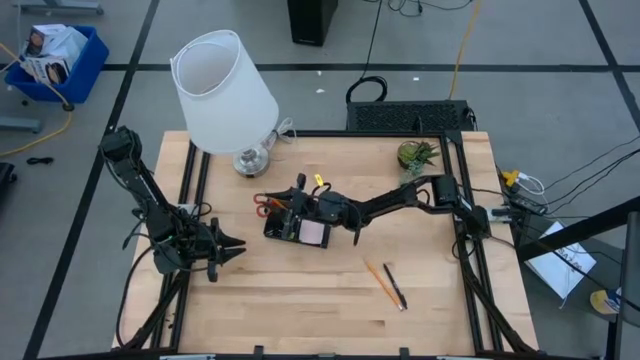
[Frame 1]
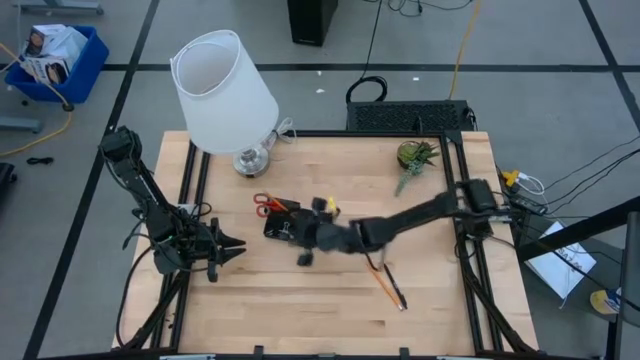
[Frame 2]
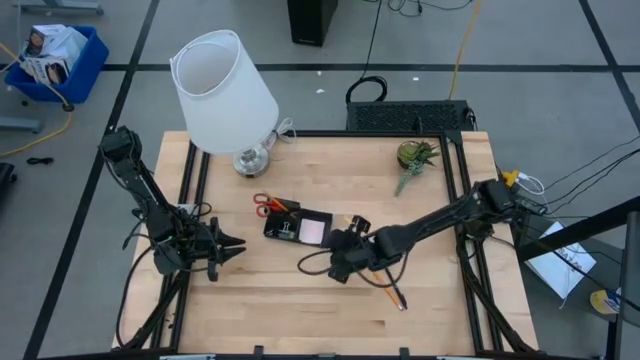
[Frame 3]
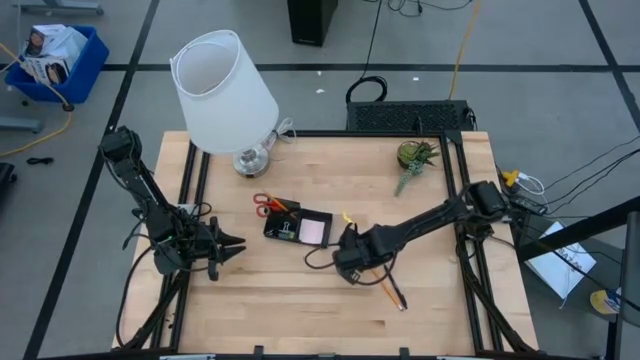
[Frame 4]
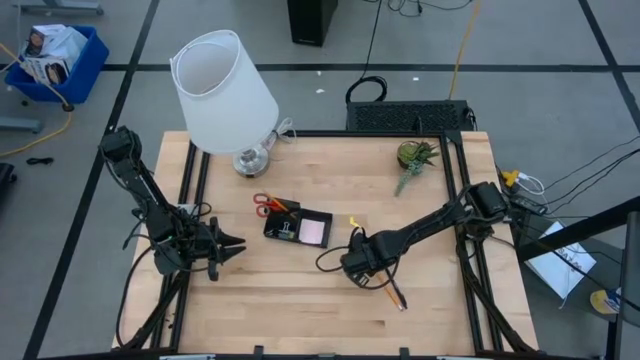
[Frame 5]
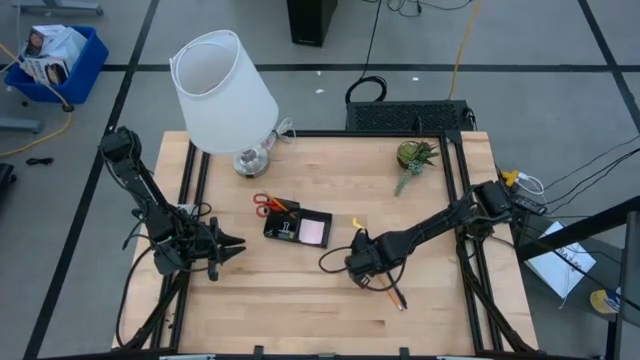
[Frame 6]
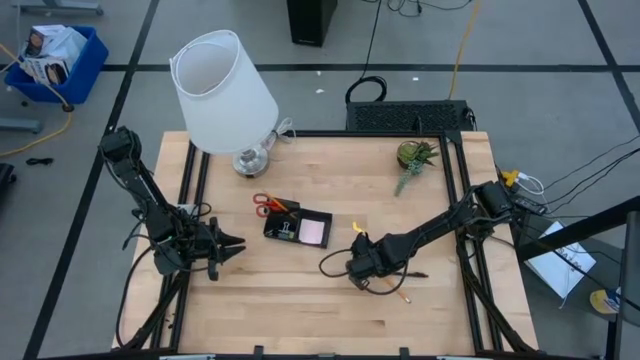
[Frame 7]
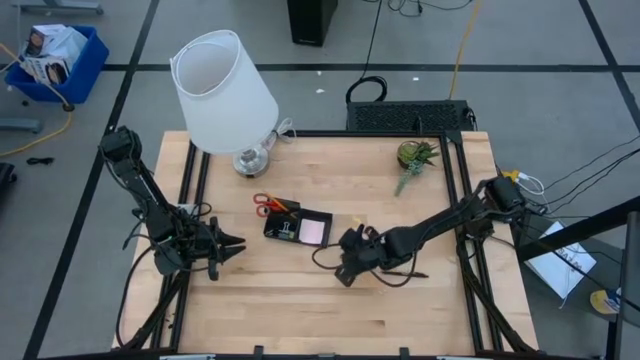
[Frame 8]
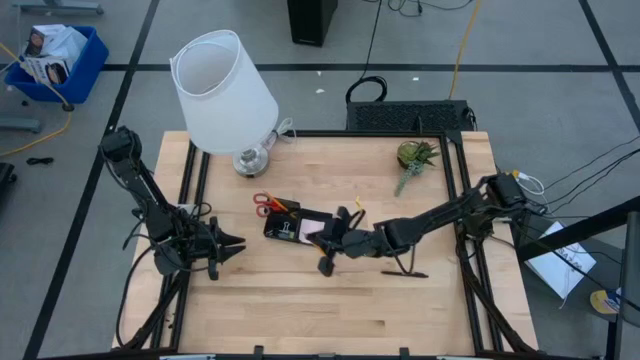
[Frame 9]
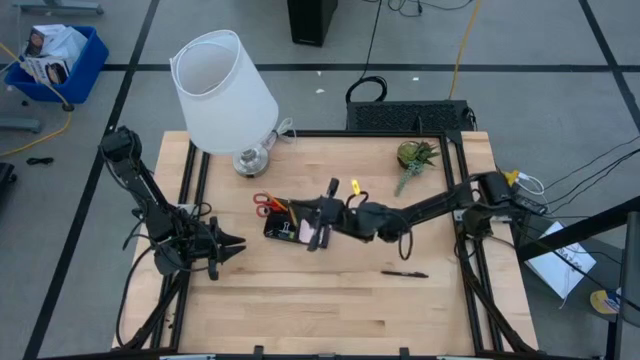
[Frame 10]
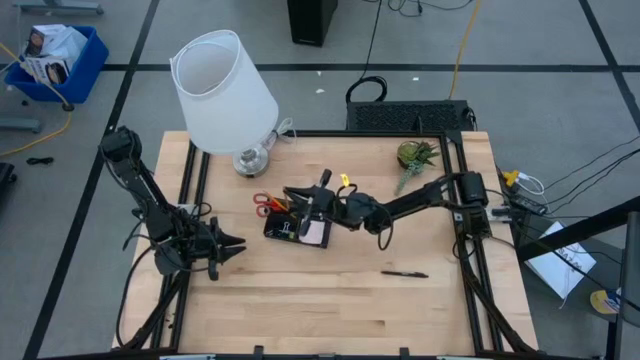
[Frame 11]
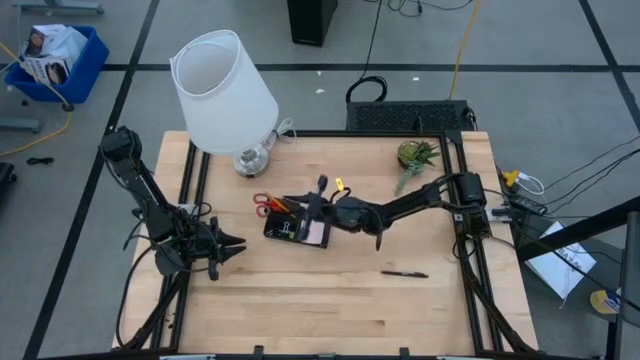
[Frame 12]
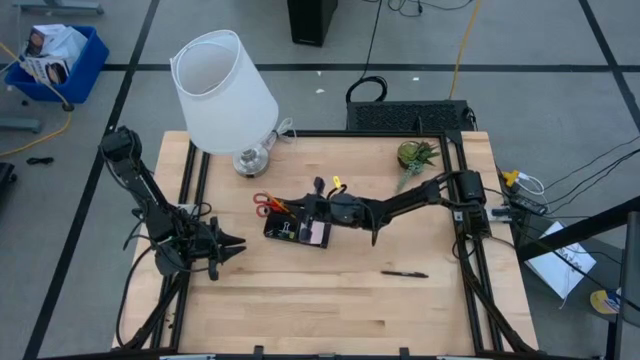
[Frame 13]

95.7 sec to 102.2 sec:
Task: Pick and place office supplies into organizer
Put the orange pencil into the black desk organizer

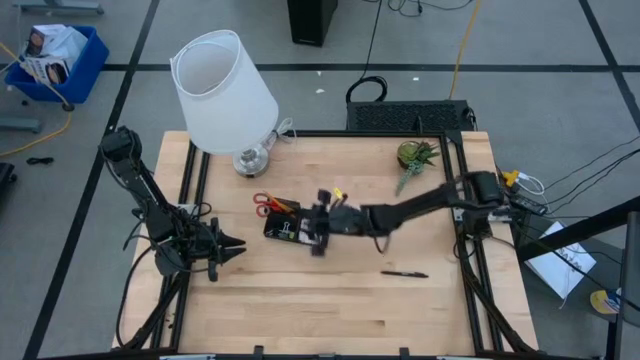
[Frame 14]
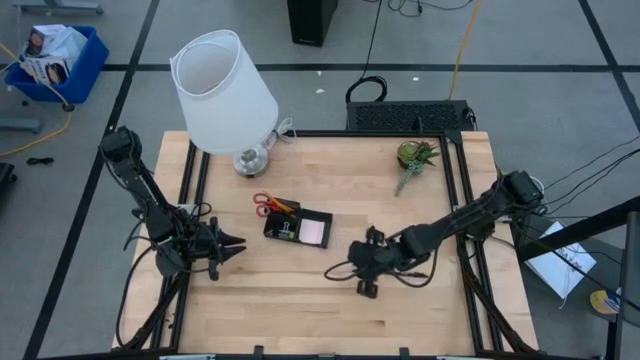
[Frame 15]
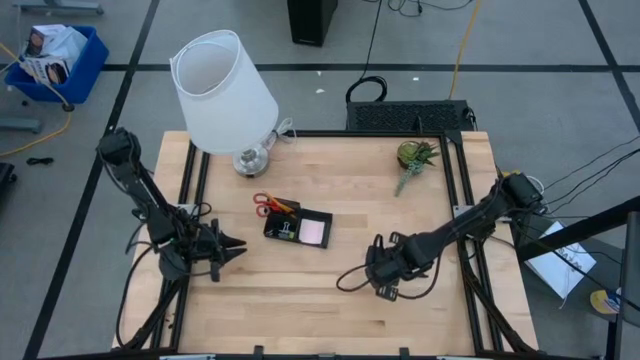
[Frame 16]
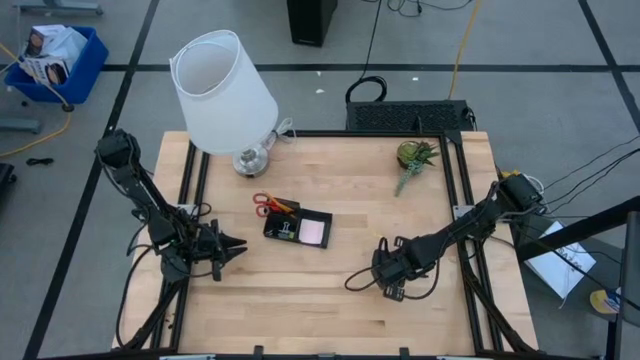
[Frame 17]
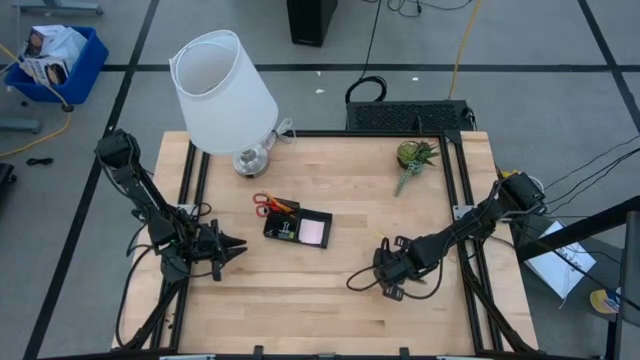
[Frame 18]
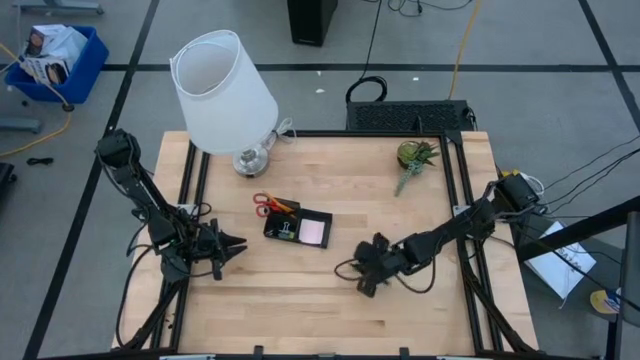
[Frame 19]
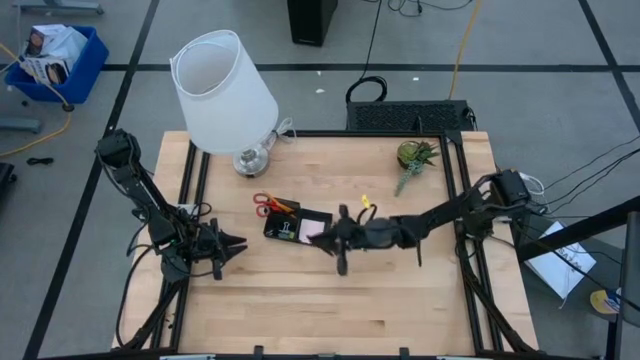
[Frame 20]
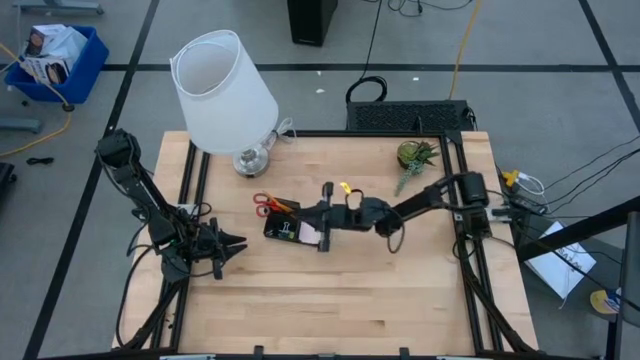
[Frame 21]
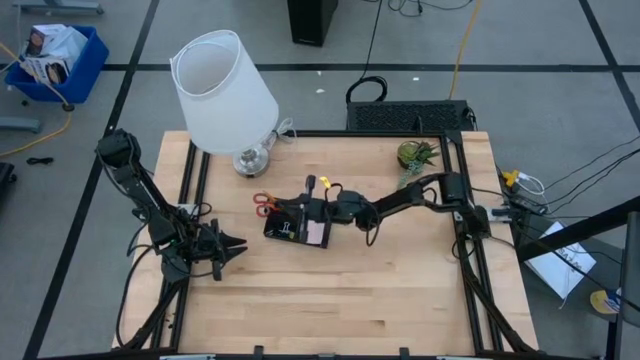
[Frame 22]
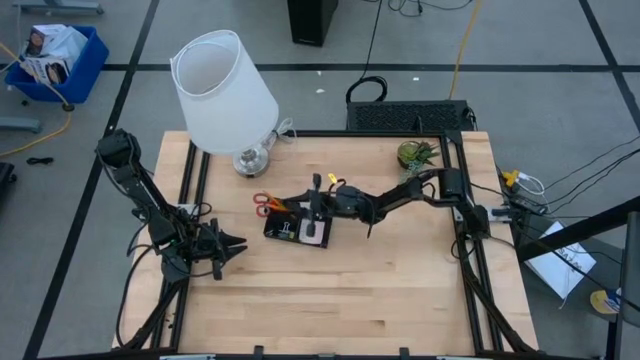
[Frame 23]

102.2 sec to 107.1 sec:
Put the black pen into the black desk organizer

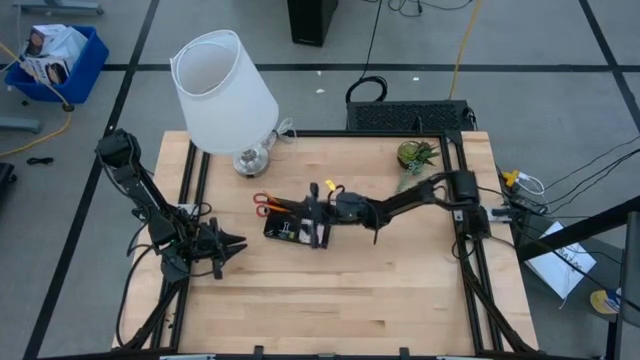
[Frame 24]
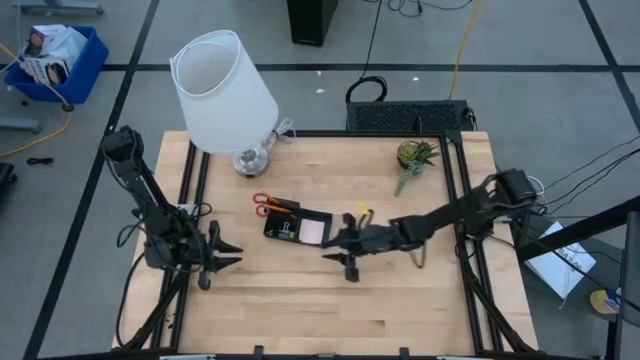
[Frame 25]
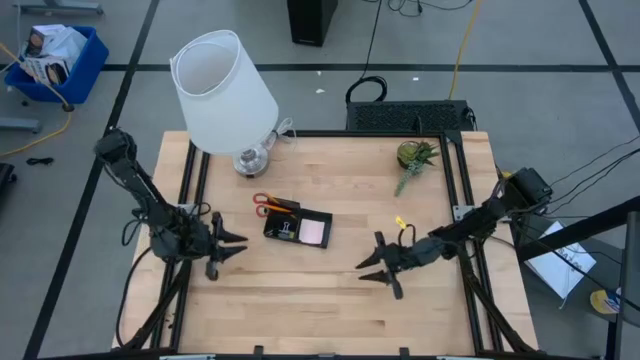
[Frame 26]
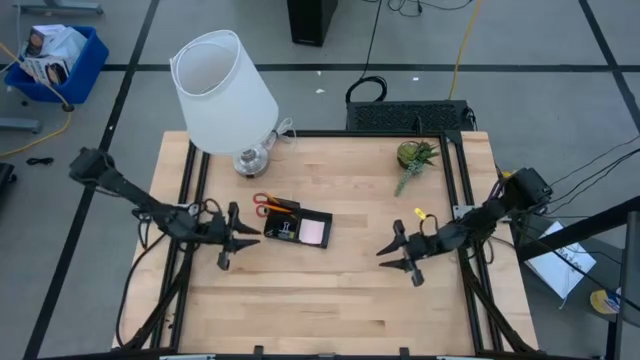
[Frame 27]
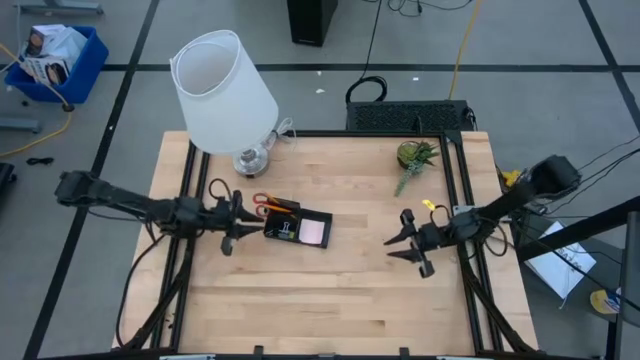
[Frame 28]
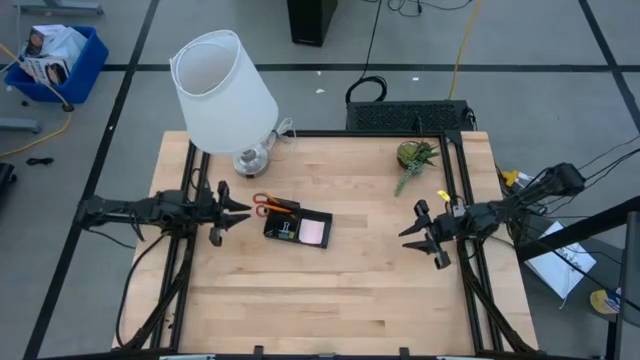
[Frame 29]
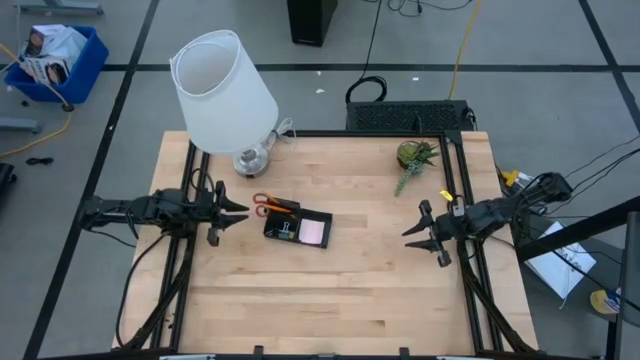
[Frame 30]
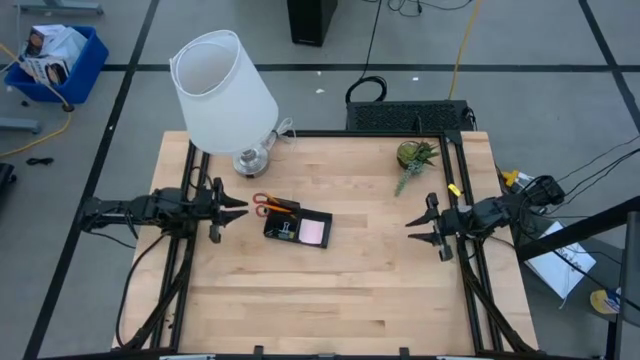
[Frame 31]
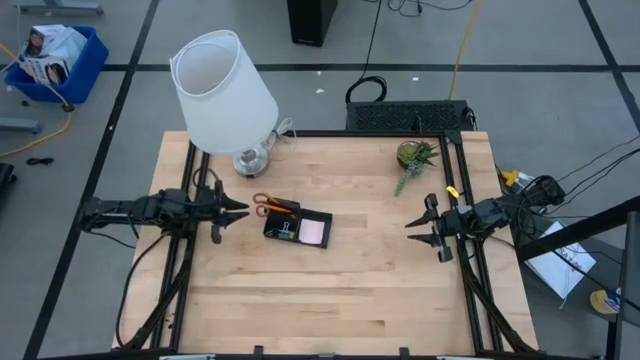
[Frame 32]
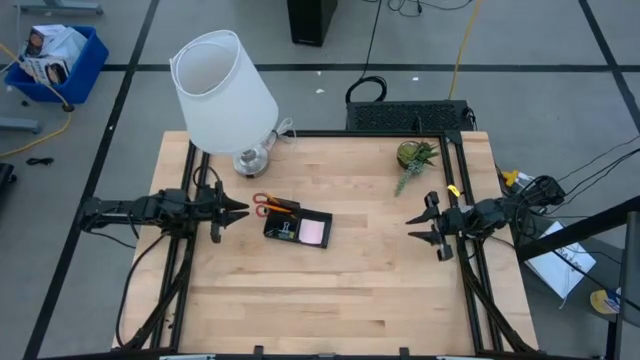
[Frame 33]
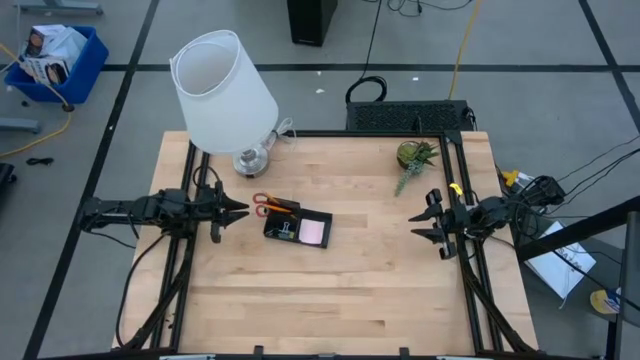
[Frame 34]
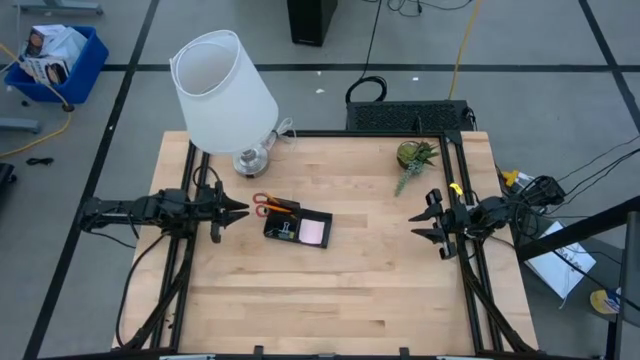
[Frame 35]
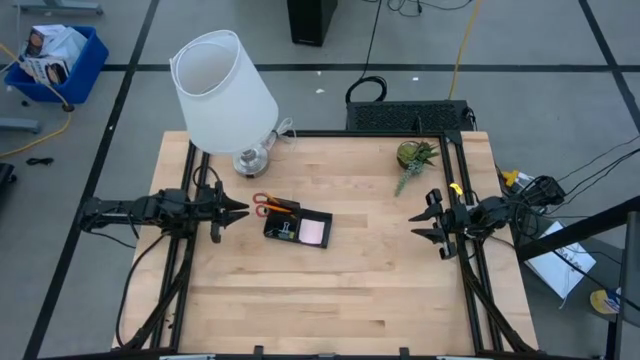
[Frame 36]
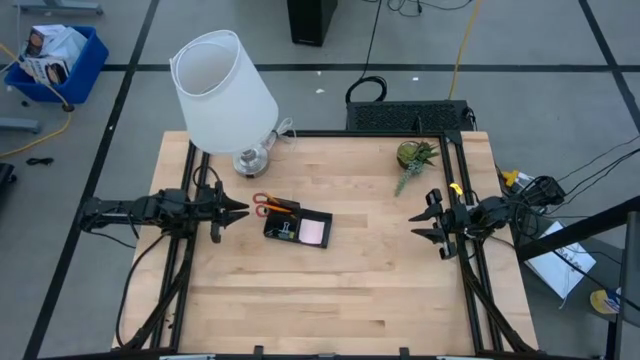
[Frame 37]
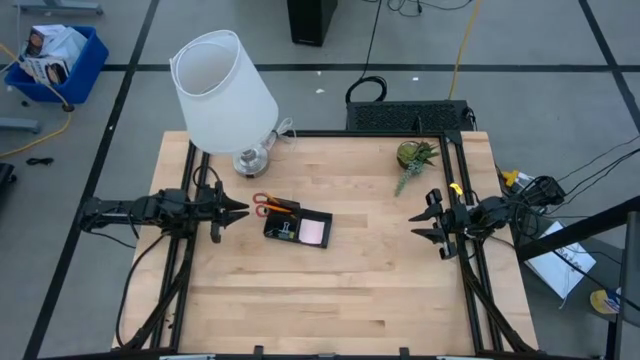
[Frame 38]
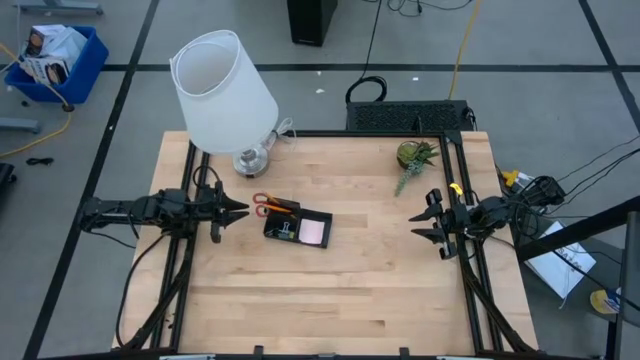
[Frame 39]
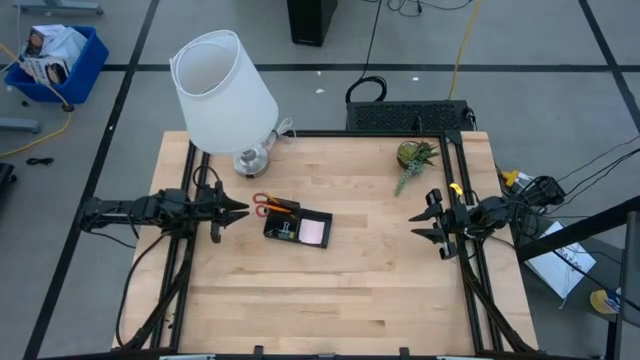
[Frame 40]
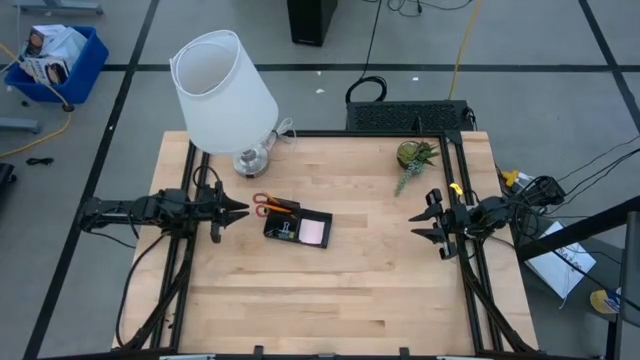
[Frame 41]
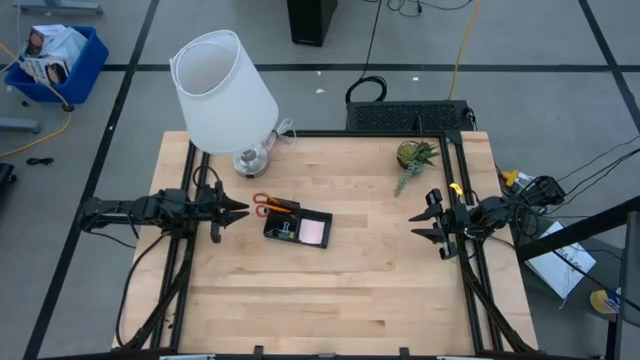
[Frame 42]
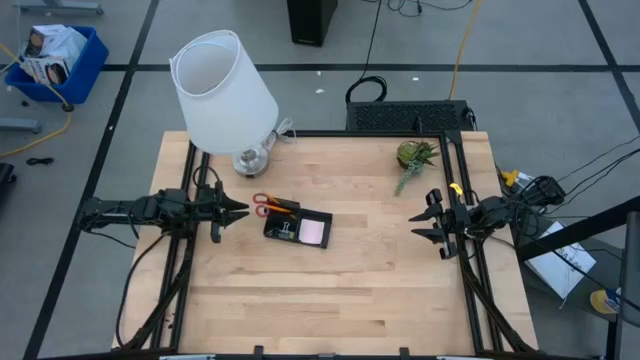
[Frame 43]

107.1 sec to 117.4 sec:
Return to Home Position
